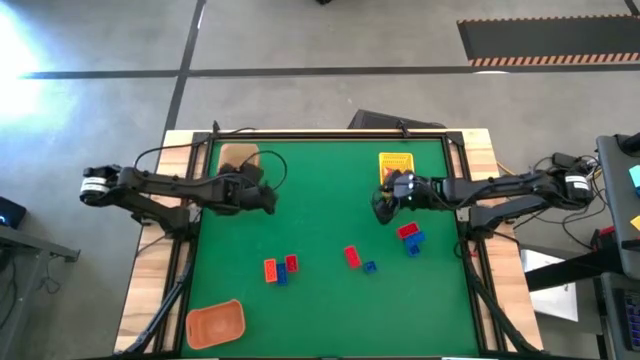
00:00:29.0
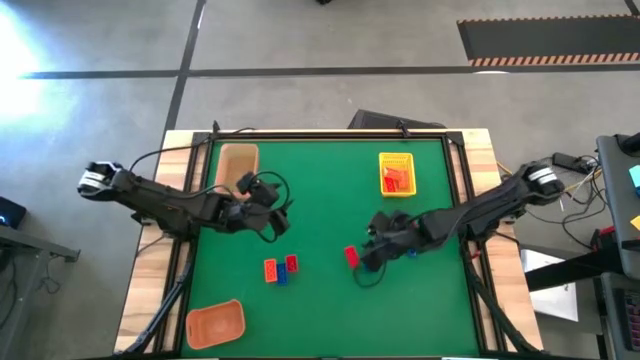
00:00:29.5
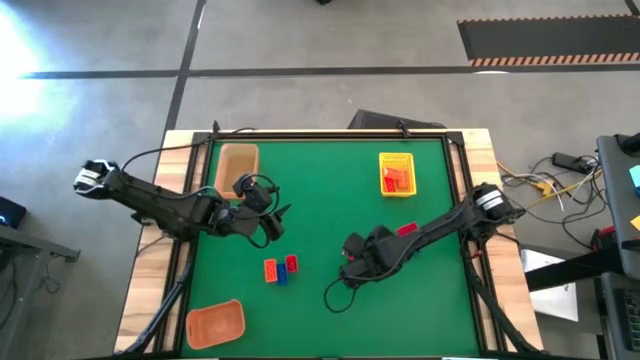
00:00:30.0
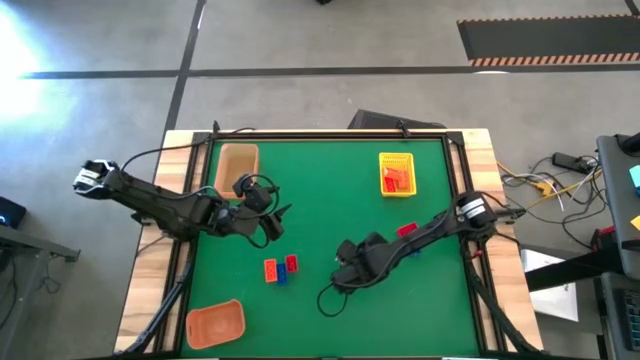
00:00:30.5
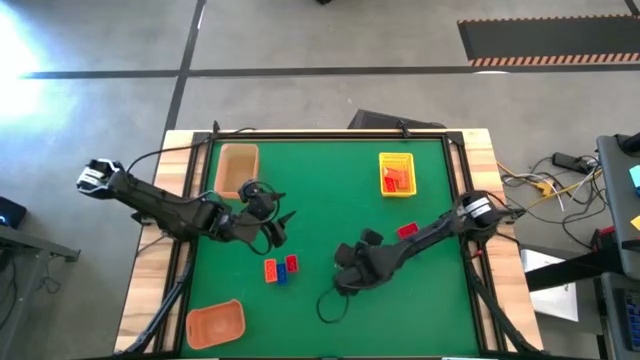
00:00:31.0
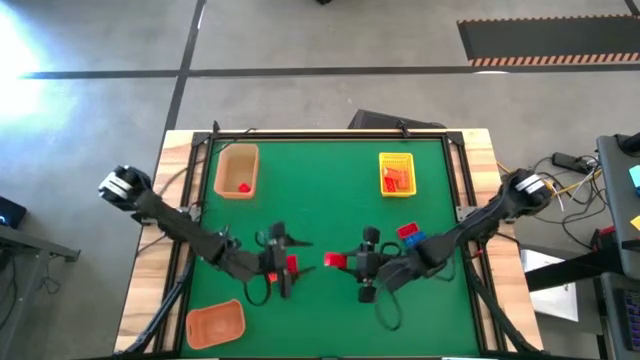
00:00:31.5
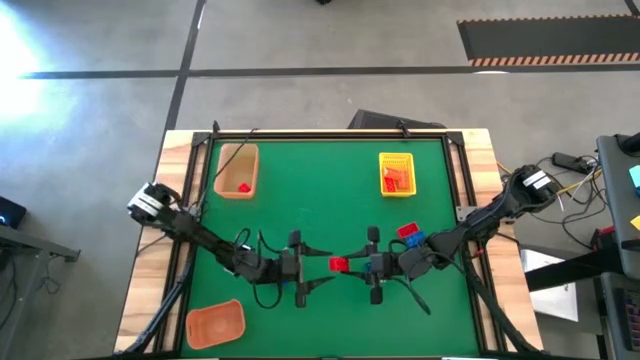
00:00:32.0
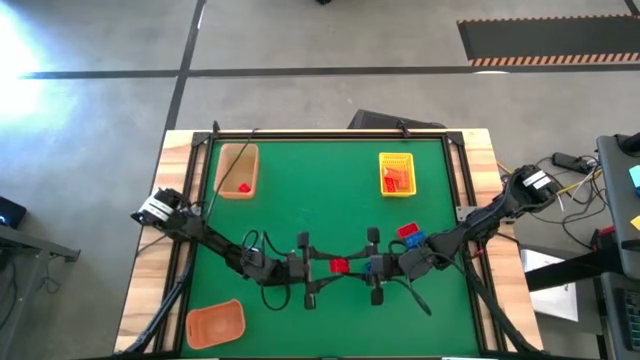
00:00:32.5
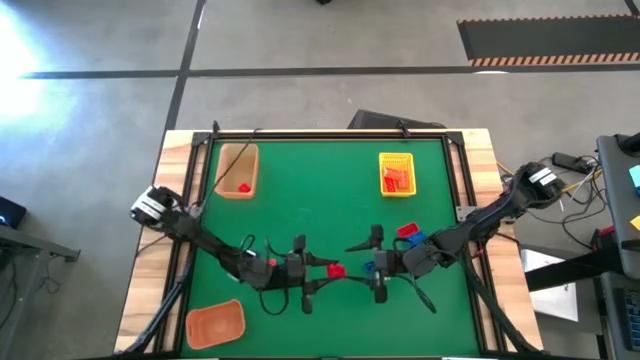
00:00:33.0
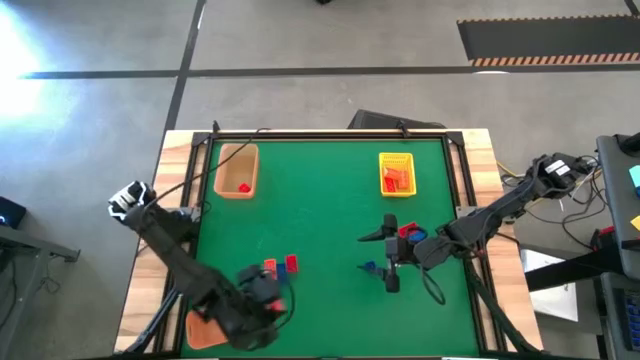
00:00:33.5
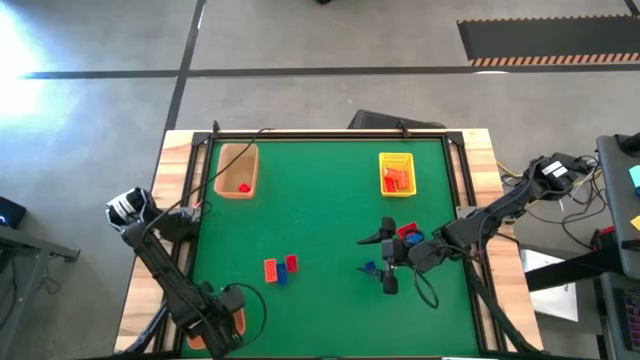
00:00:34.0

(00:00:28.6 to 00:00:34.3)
Task: Sort & place blocks by color
Put the red game piece into the orange bin

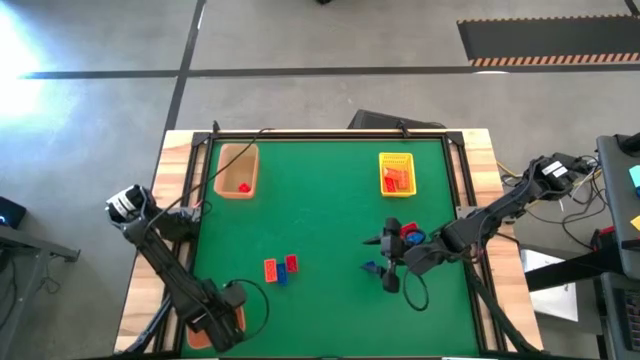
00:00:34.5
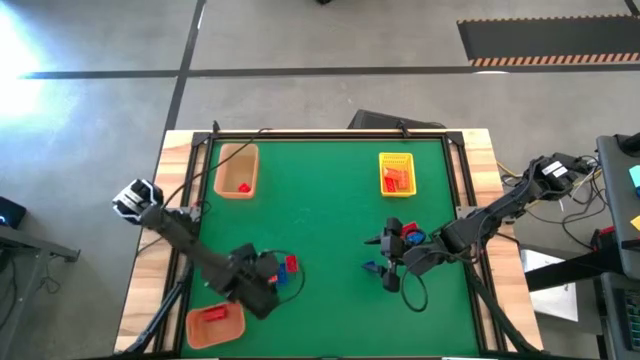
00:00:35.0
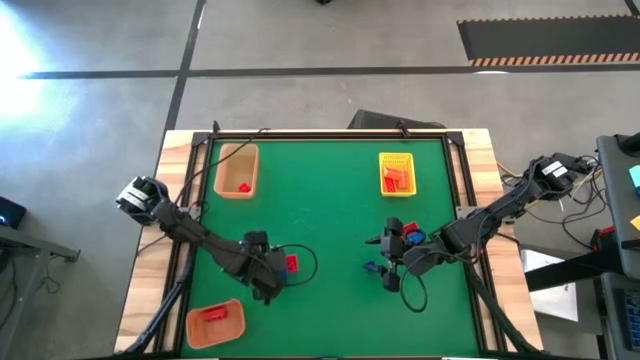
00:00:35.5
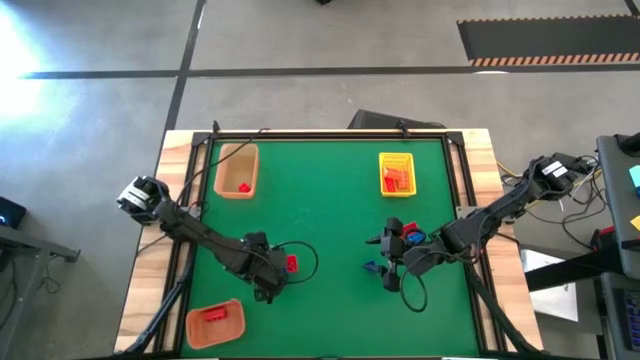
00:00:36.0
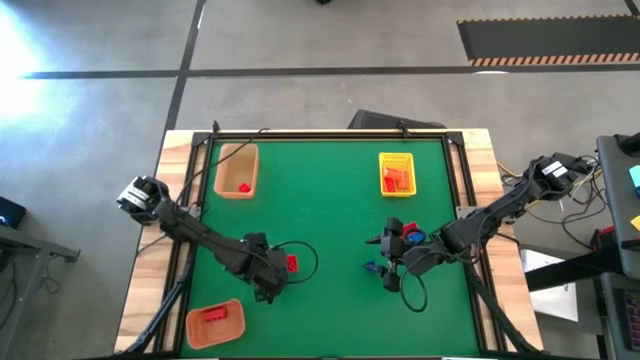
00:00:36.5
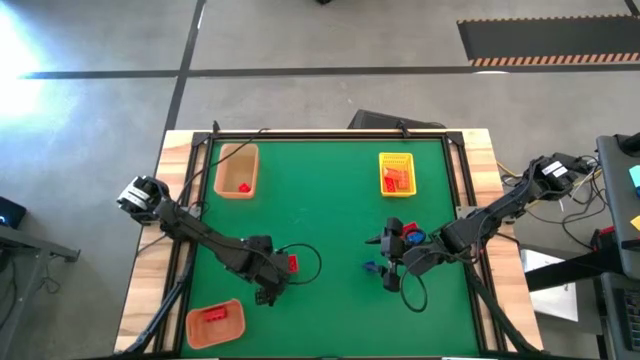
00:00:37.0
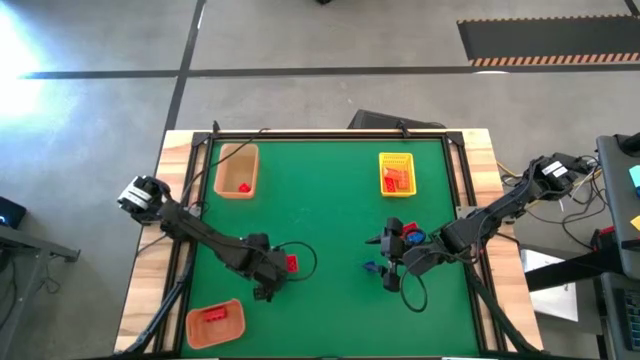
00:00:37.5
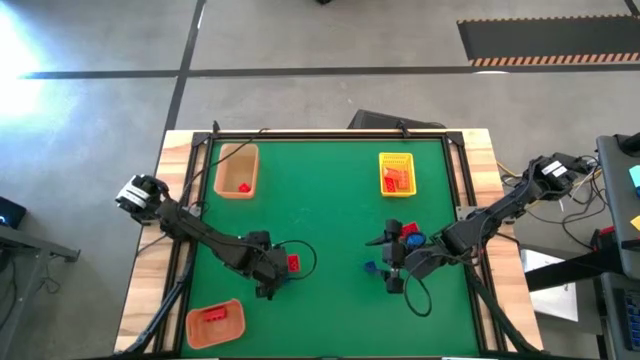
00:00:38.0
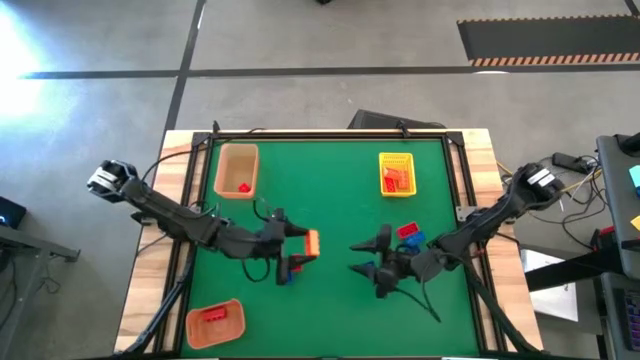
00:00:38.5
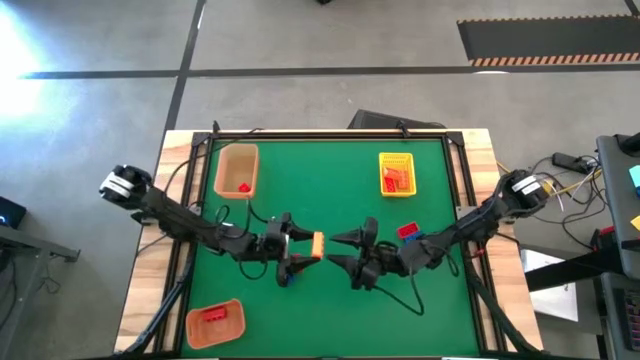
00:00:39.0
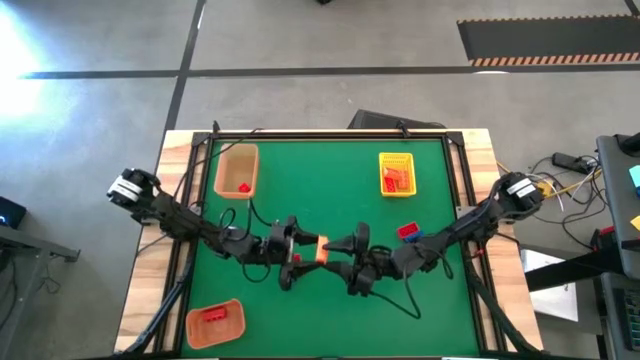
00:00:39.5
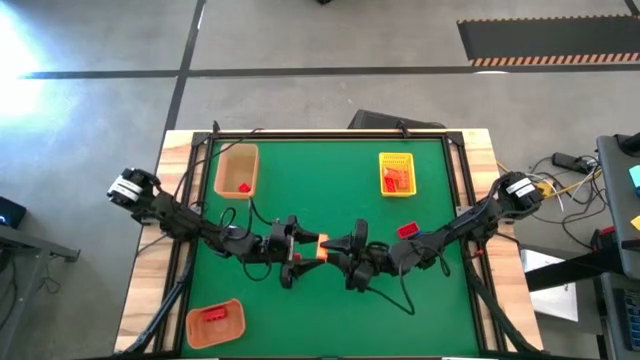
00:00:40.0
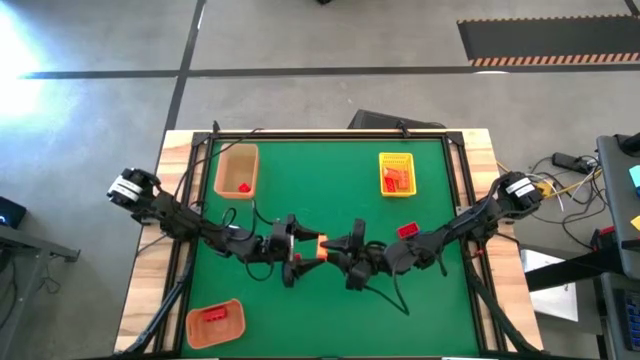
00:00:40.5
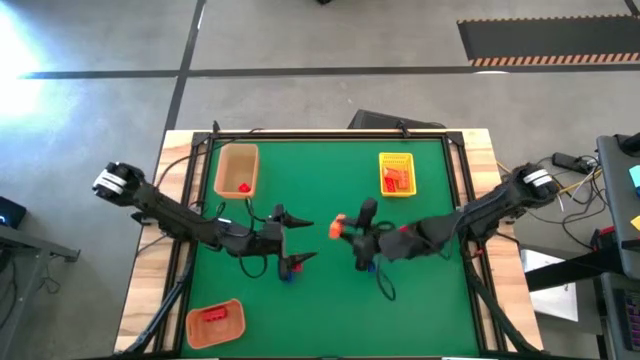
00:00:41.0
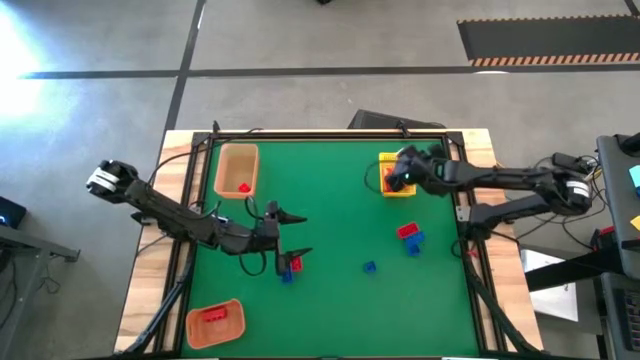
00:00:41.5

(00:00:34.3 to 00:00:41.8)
Put the orange game piece into the yellow bin

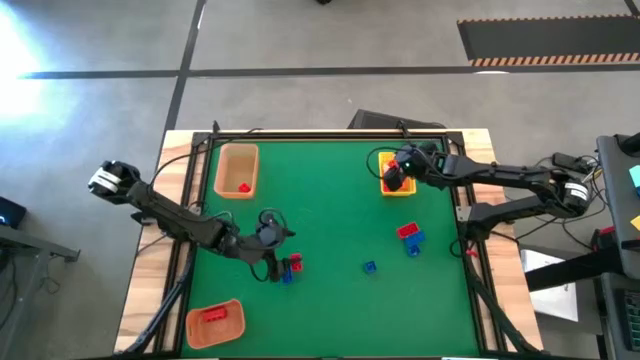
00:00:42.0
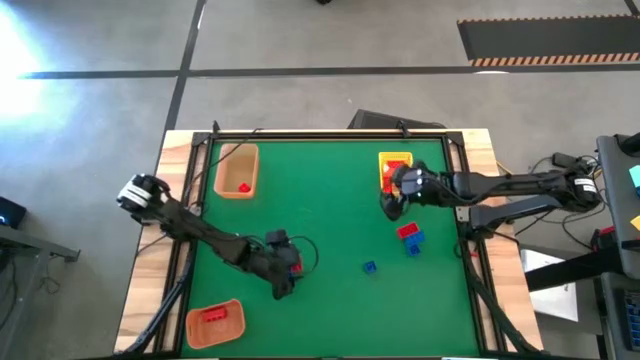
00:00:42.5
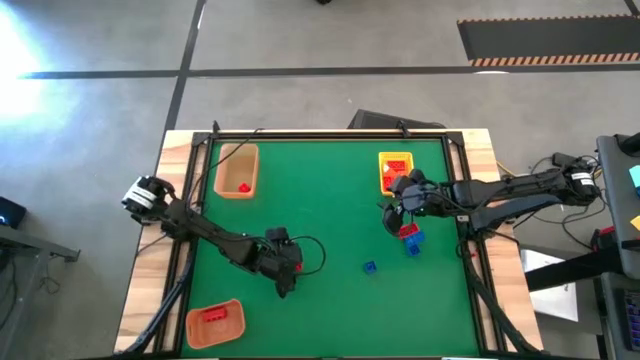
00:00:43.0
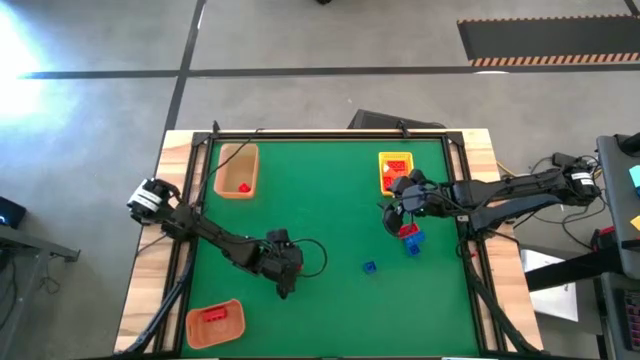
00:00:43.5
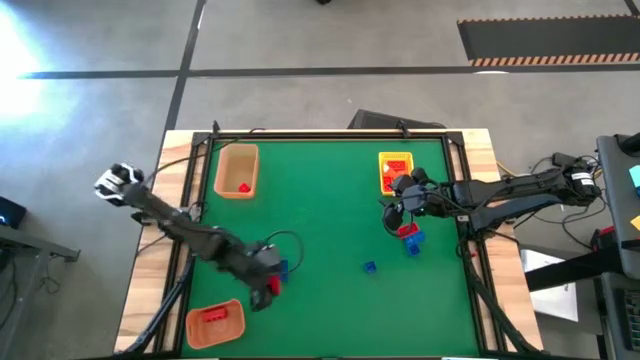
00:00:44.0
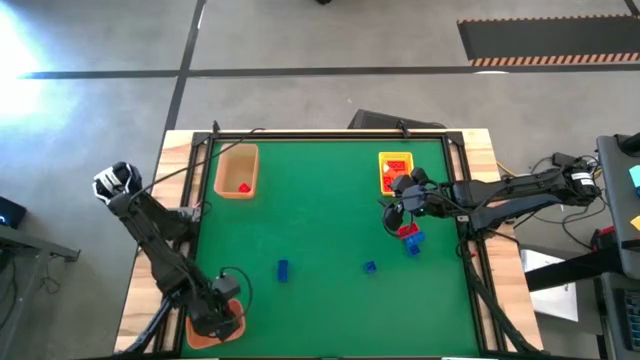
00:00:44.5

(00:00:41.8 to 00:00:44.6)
Put the red game piece into the orange bin

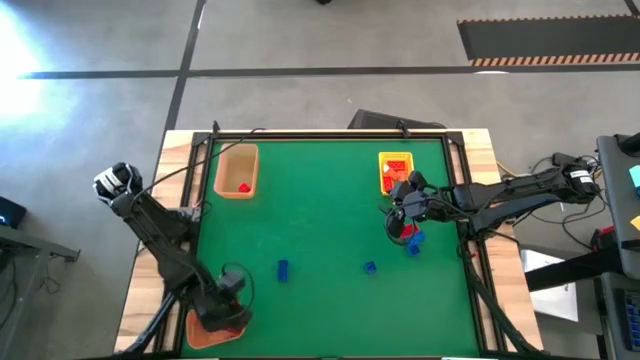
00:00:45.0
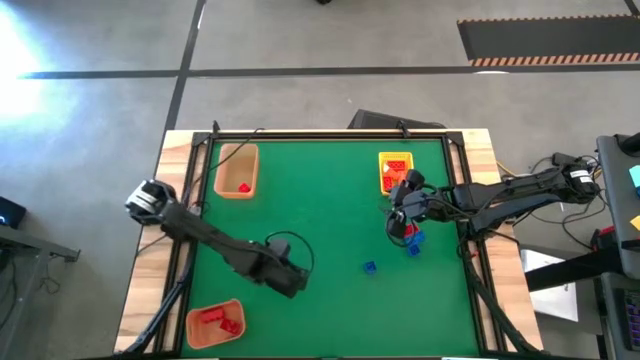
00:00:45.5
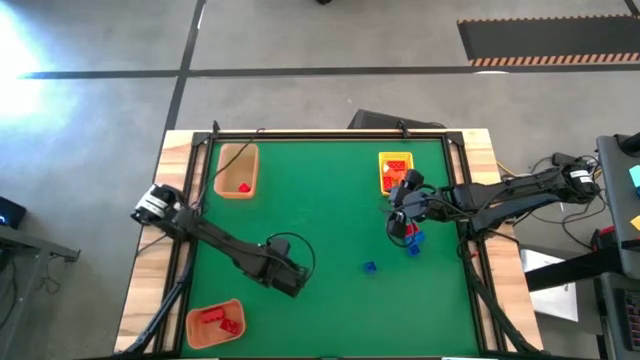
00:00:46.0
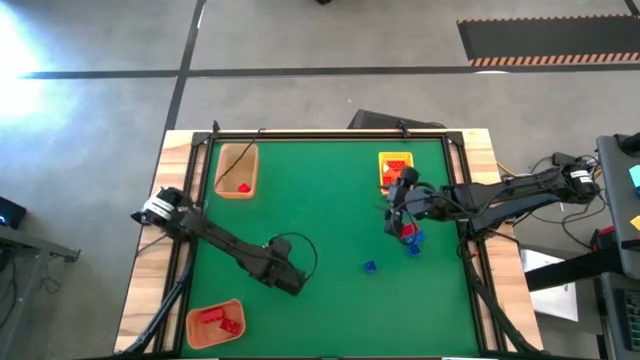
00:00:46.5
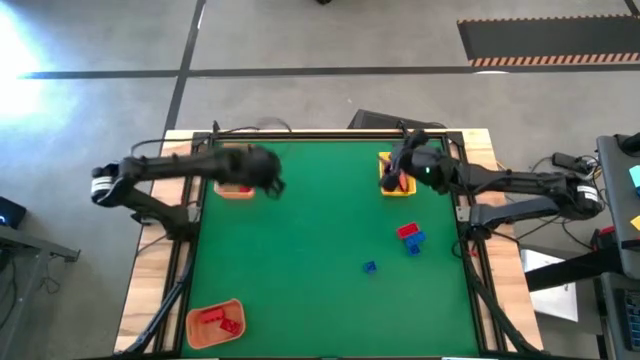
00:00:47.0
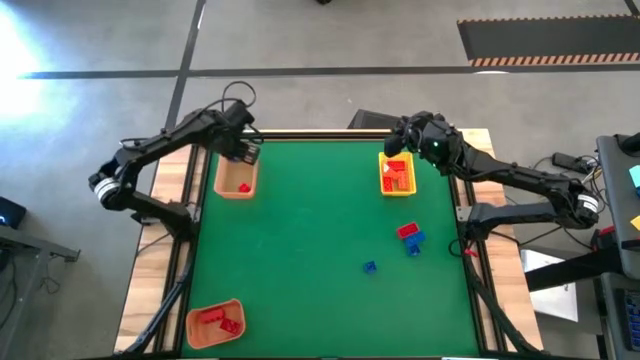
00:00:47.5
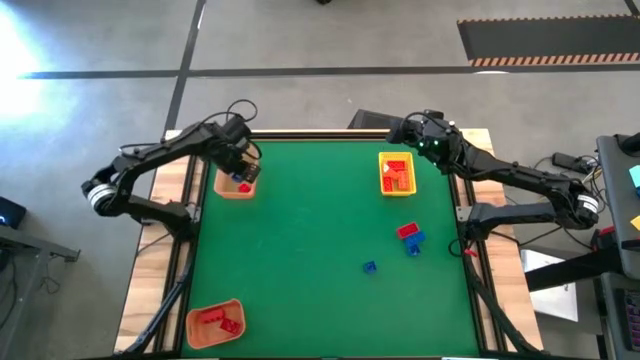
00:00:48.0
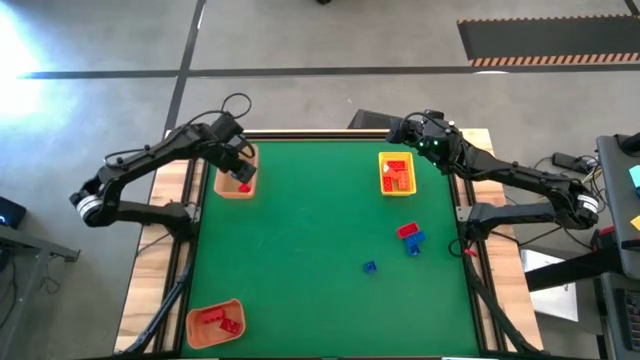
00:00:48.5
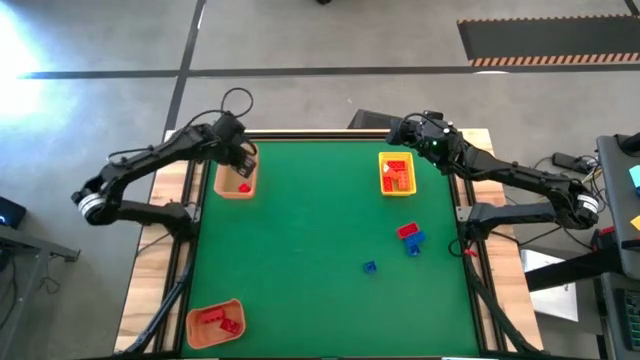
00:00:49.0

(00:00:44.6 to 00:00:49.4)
Put the blue game piece into the light orange bin

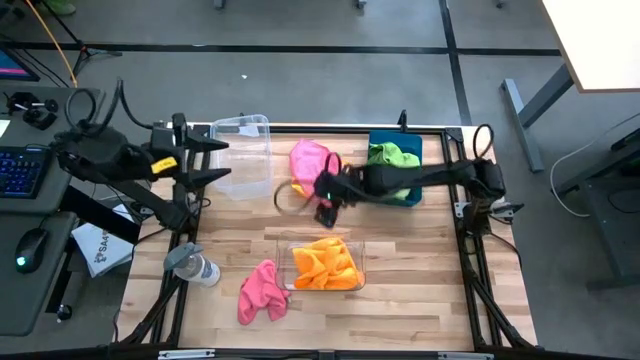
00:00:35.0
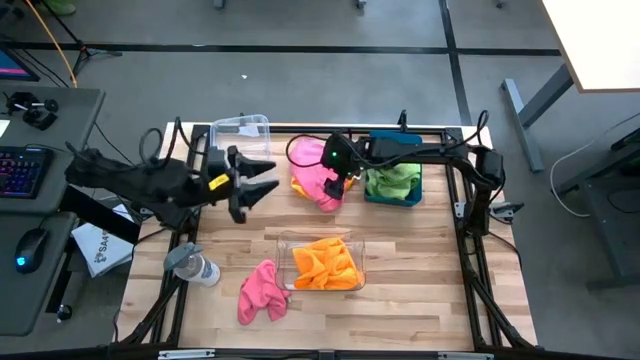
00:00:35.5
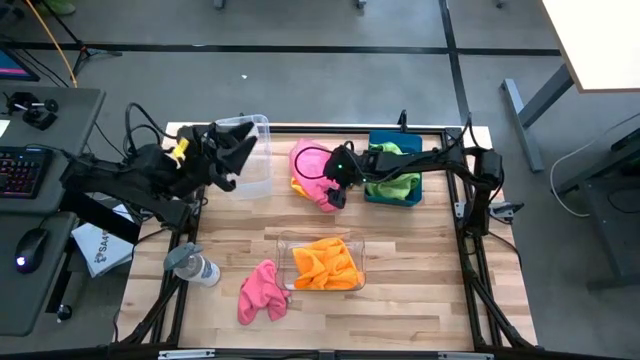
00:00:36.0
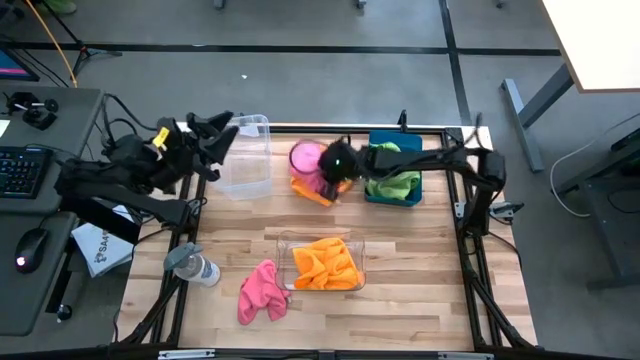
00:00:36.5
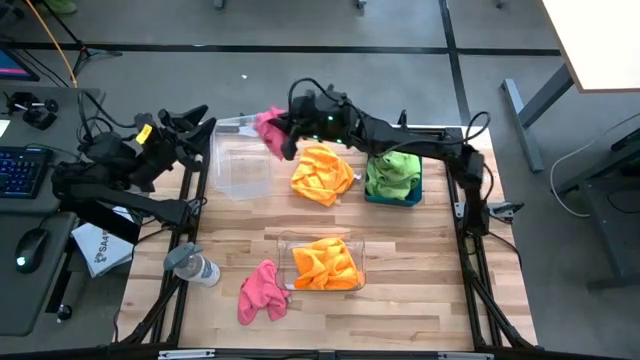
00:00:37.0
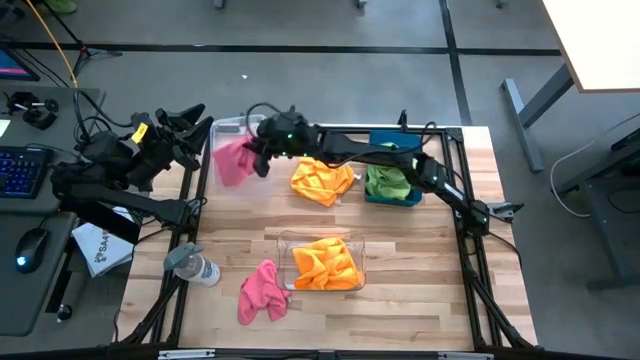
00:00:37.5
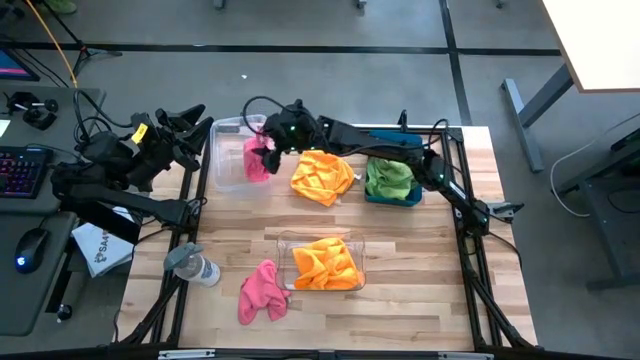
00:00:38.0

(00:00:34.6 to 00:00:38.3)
Task: Sort microfiber towel by color & place in baskets
Put the top pink microfiber towel into the top transparent bin
